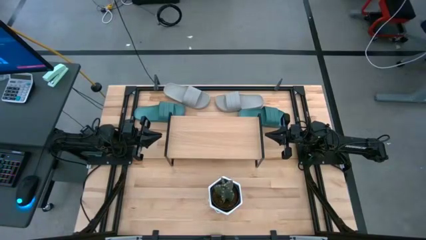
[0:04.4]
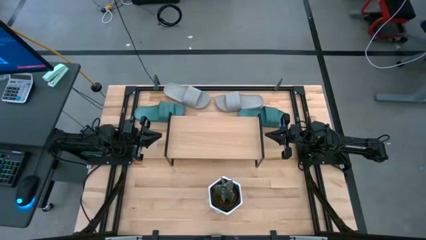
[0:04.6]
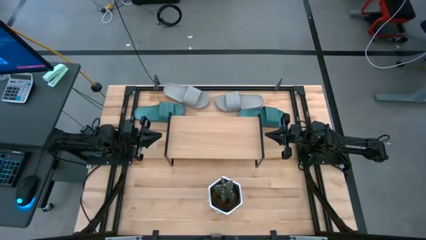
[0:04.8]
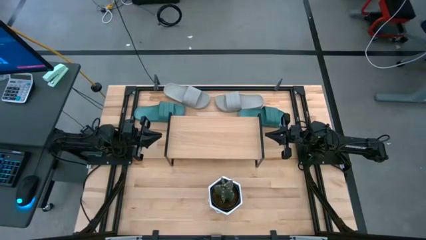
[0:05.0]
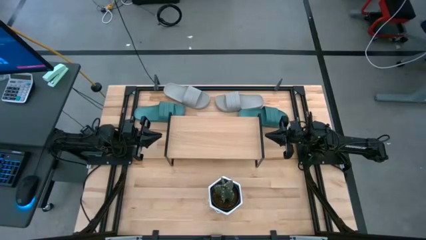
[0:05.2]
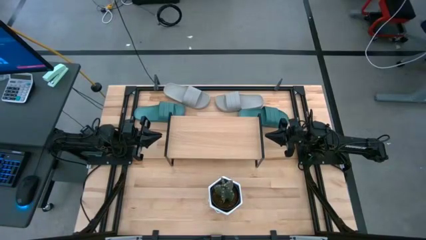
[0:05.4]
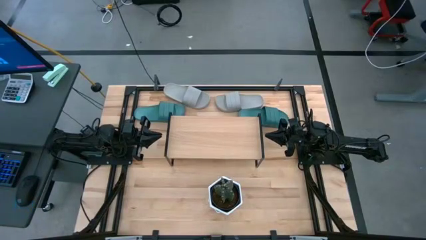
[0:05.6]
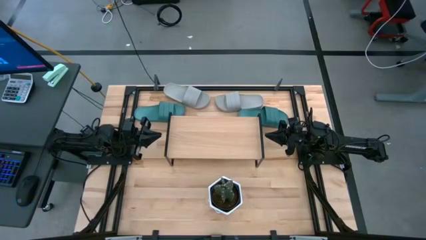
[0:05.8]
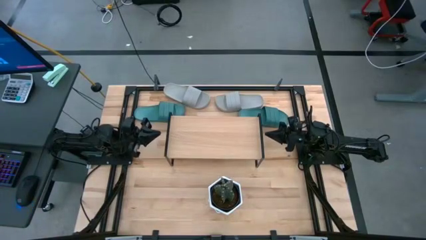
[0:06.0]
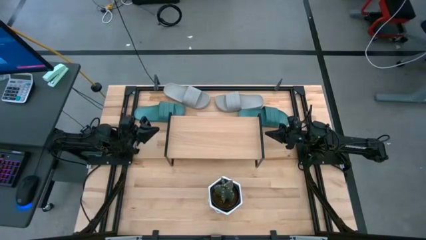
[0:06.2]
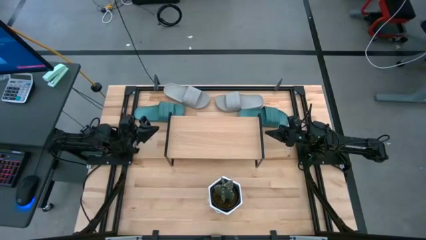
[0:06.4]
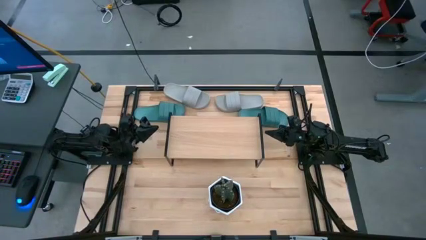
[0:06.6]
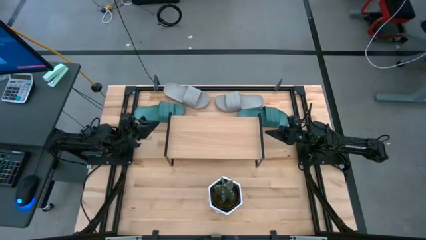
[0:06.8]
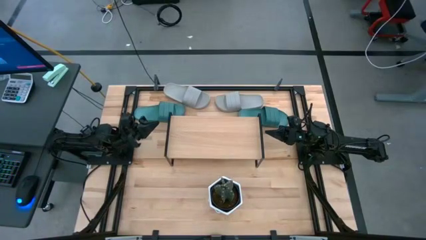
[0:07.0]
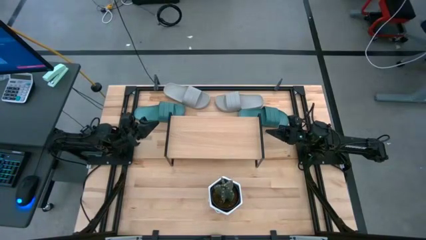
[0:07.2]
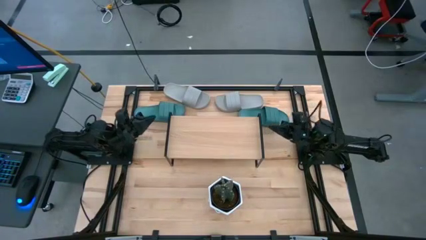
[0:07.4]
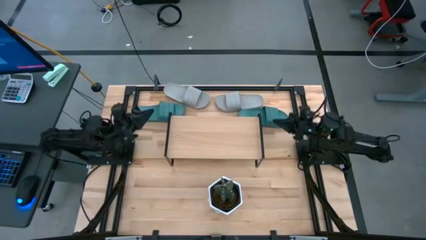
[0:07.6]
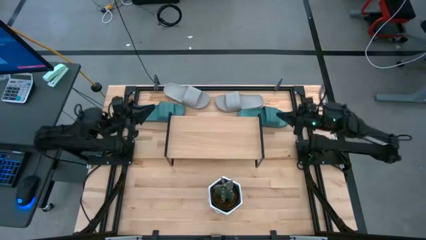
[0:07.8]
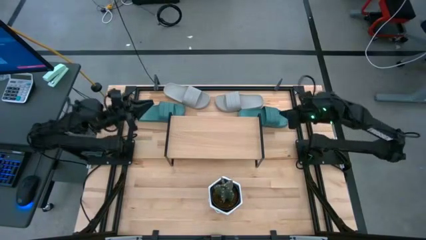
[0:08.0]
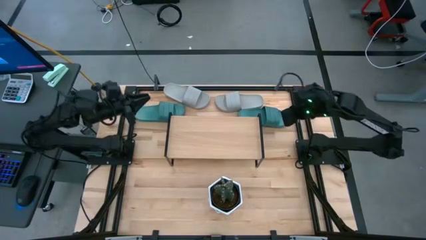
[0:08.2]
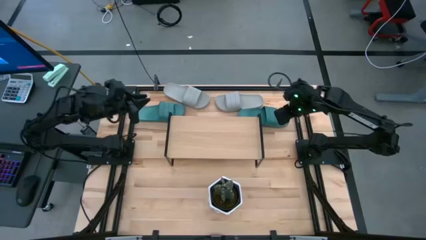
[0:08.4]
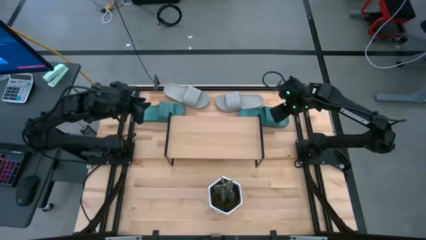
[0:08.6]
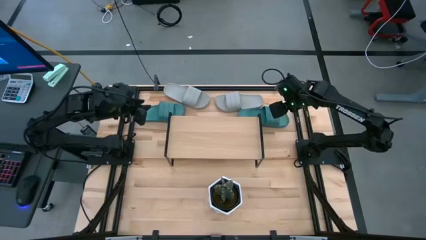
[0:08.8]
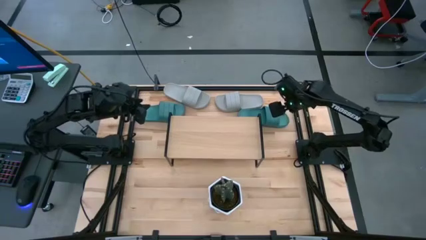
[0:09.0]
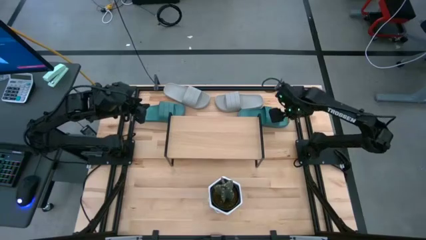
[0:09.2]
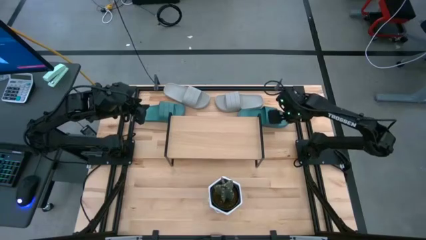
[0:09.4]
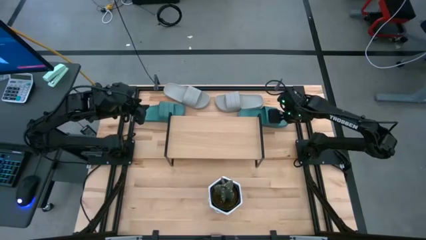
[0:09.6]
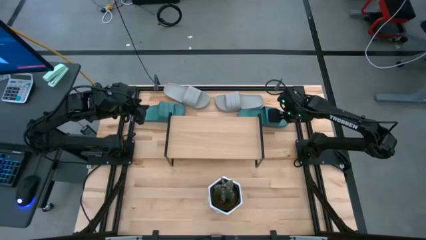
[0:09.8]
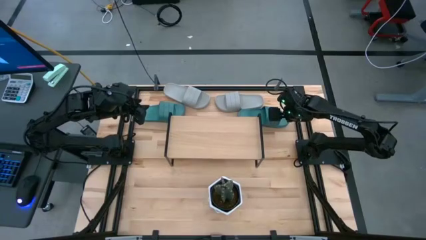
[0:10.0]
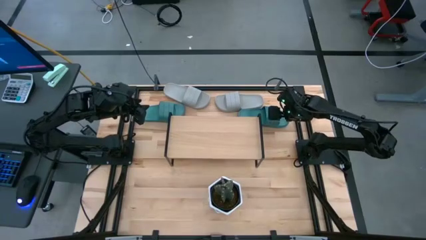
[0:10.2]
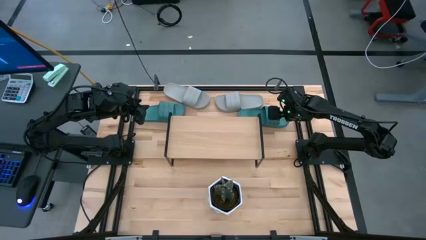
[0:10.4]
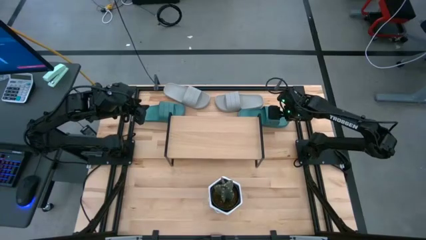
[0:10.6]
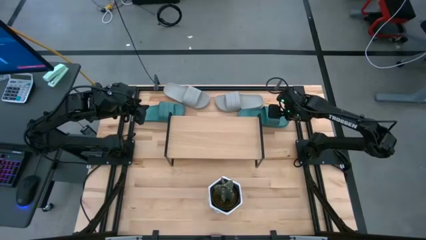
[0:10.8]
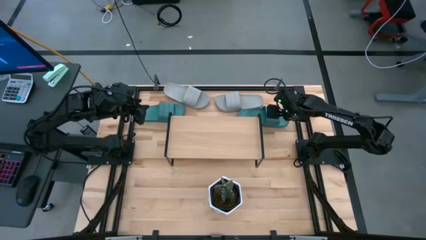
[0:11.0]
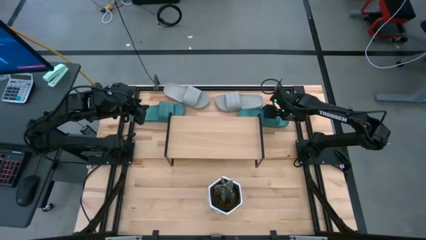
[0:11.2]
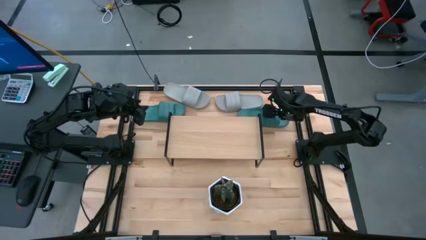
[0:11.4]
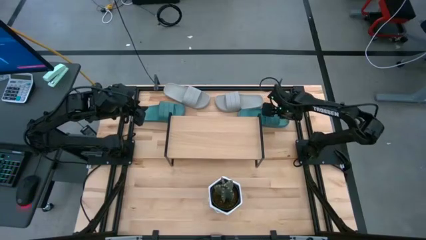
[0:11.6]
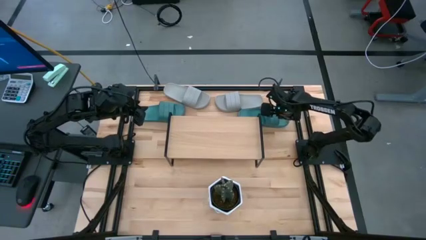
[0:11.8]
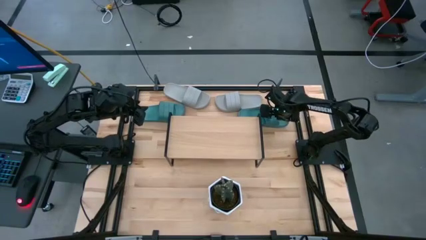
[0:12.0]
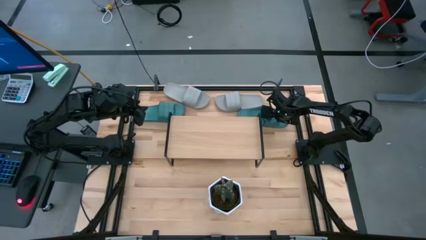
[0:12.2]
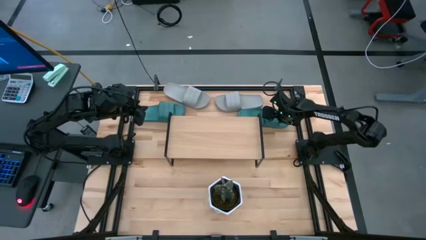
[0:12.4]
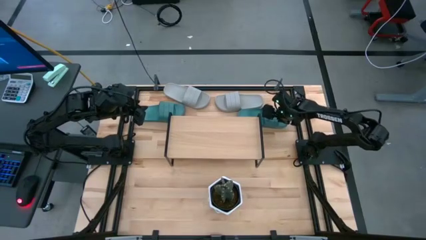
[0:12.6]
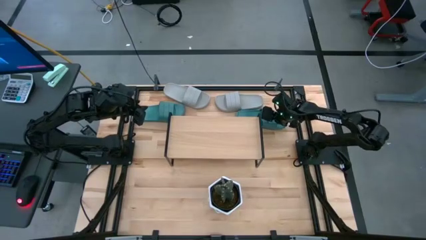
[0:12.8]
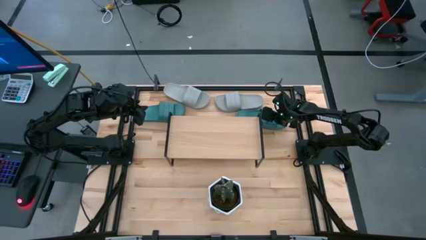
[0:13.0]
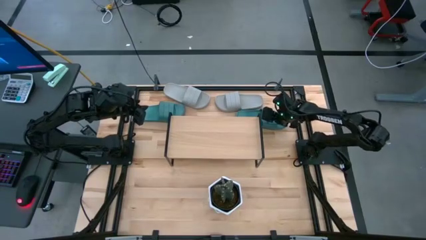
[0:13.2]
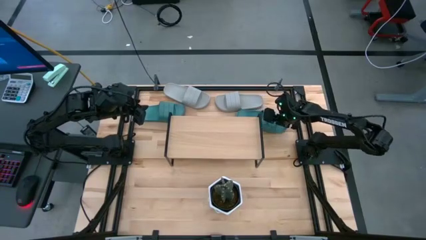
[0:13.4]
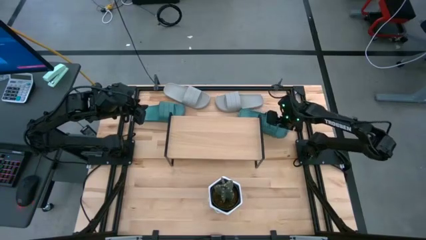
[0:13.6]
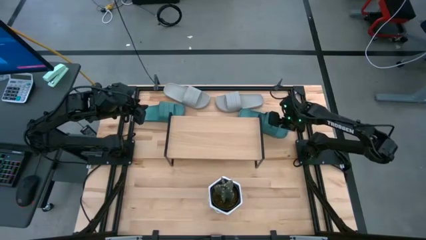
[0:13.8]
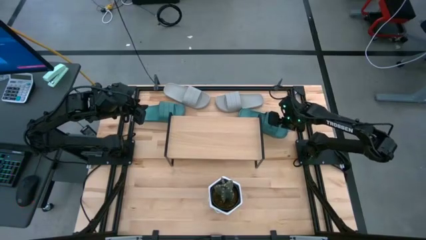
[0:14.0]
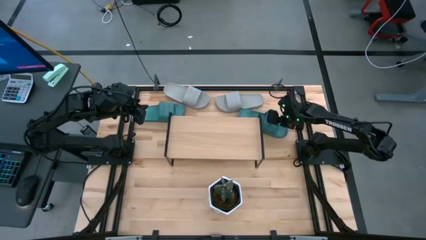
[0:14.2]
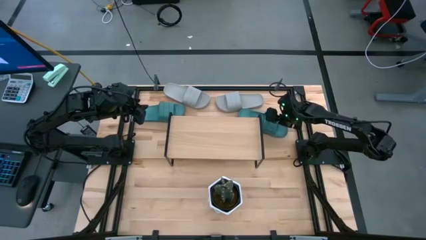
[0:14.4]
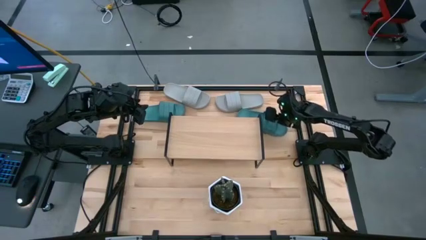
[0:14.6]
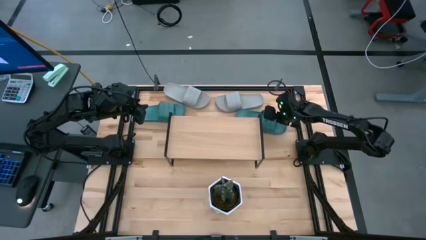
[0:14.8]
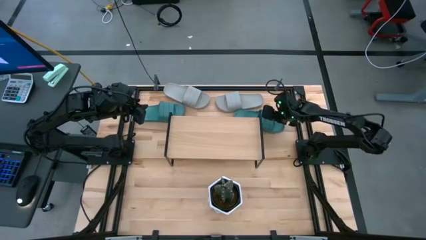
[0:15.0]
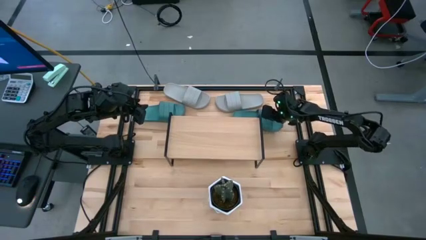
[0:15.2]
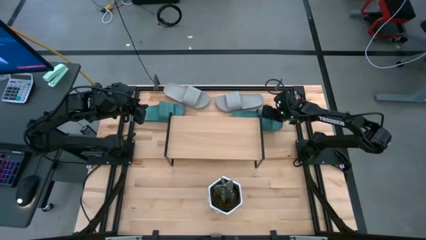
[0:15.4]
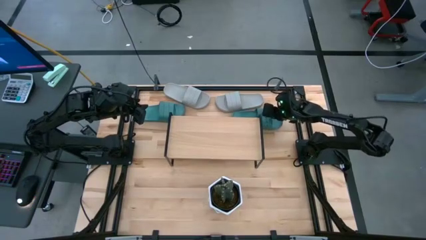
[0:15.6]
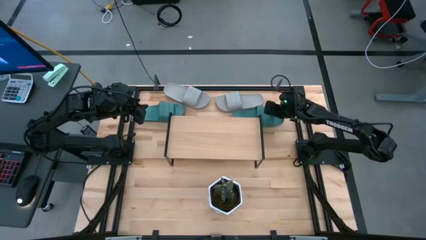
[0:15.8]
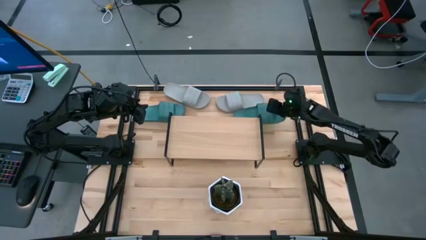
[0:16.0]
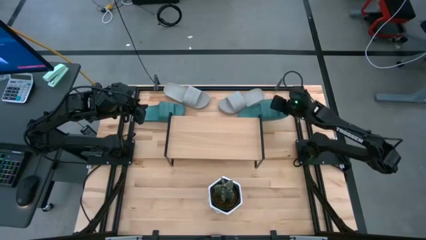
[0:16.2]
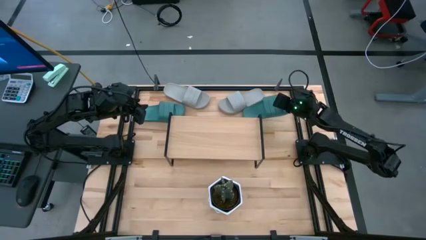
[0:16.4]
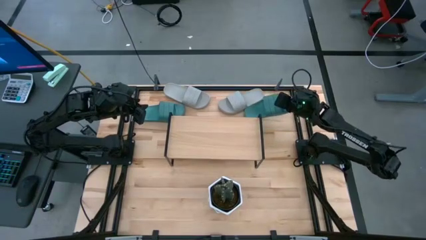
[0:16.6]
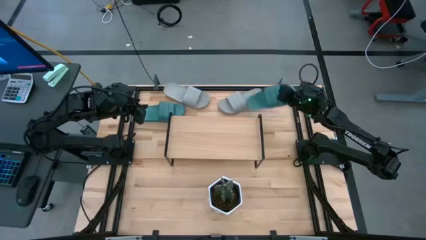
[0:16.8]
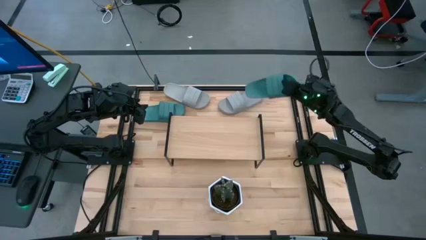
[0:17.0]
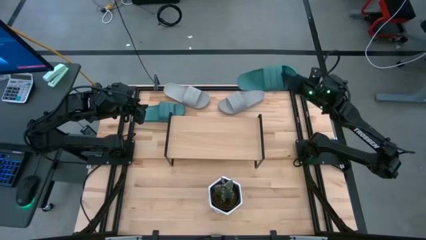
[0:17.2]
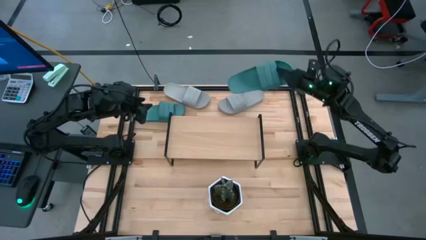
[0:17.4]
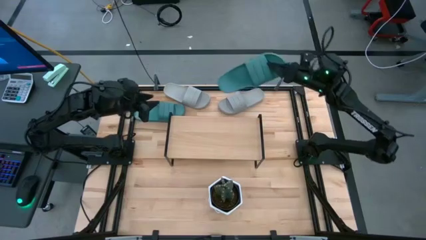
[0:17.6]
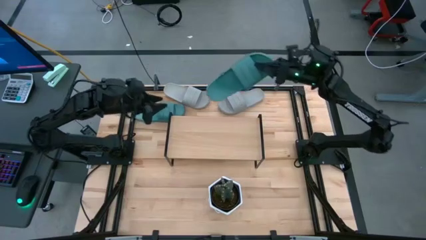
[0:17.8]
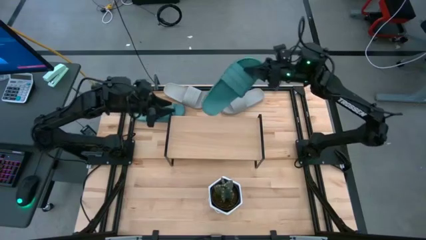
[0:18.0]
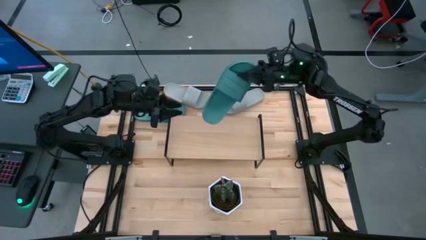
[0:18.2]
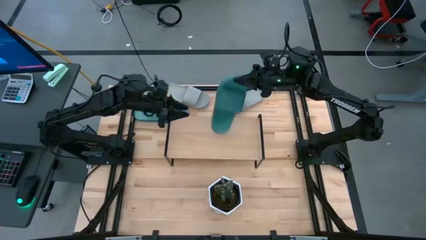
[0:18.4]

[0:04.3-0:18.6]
Task: Pick and place slides into the shelf
Put the right green slipper on the shelf
